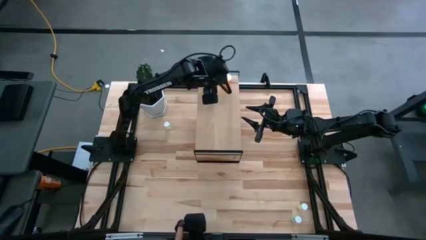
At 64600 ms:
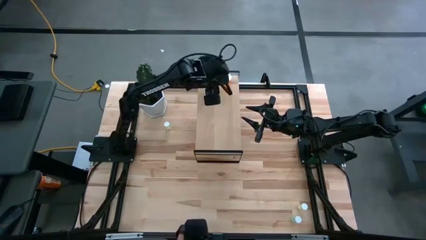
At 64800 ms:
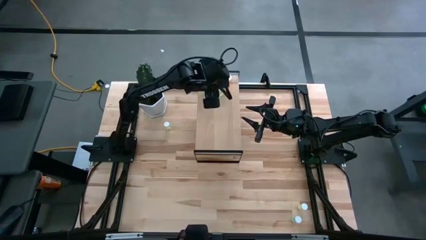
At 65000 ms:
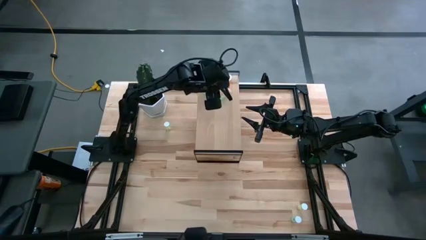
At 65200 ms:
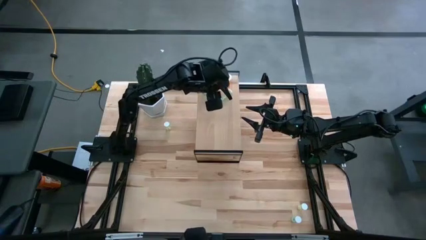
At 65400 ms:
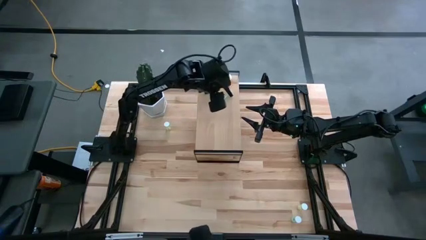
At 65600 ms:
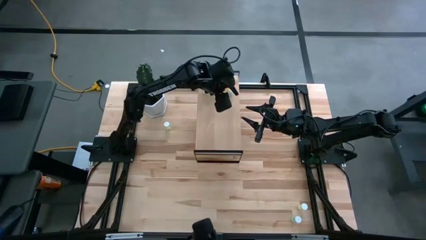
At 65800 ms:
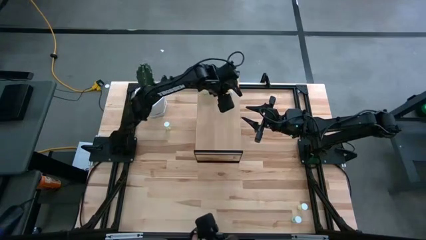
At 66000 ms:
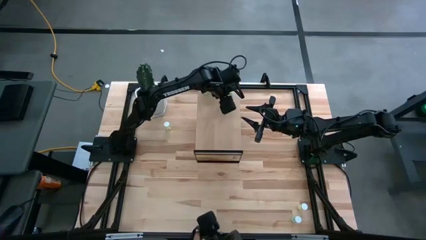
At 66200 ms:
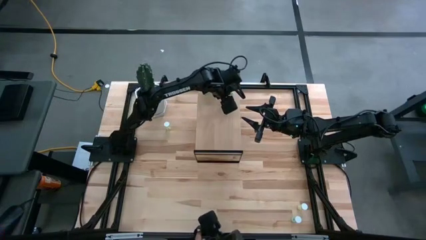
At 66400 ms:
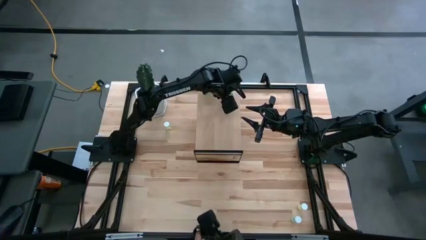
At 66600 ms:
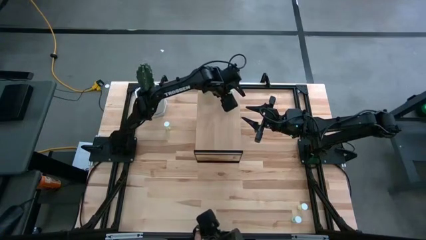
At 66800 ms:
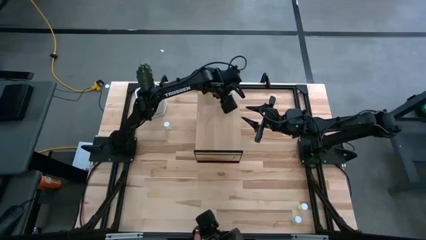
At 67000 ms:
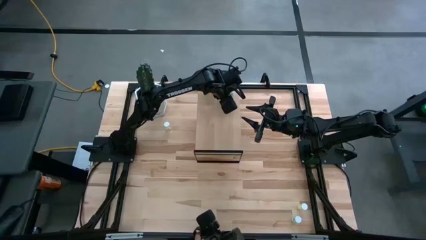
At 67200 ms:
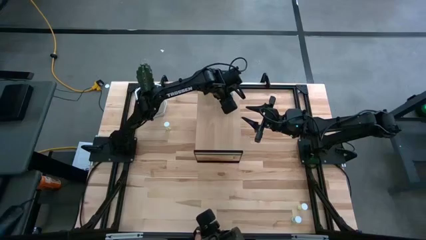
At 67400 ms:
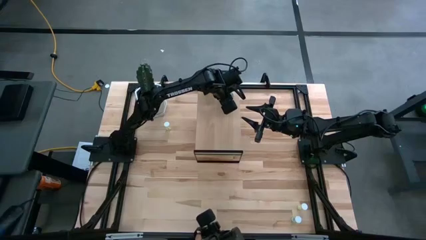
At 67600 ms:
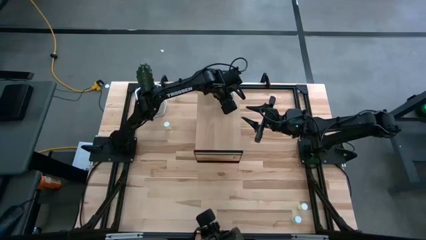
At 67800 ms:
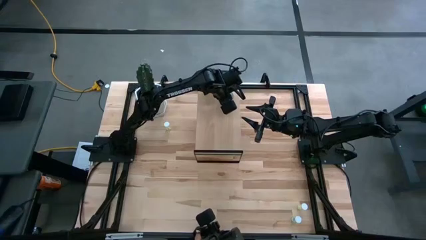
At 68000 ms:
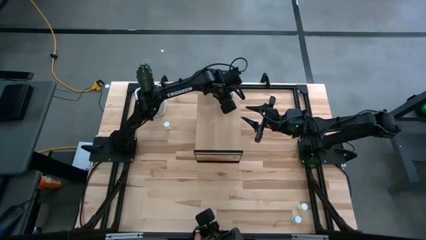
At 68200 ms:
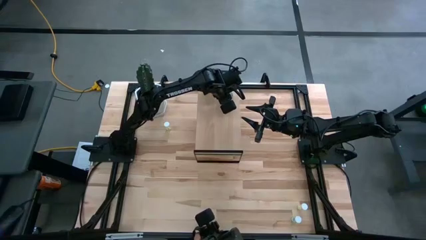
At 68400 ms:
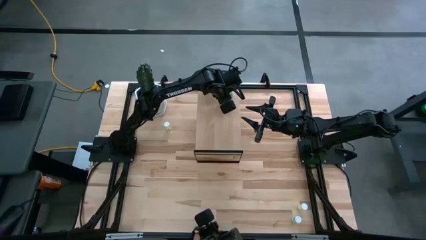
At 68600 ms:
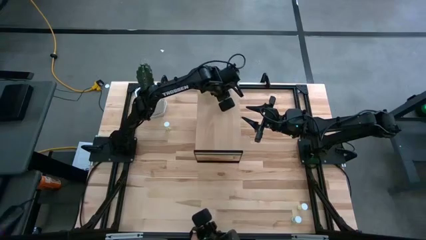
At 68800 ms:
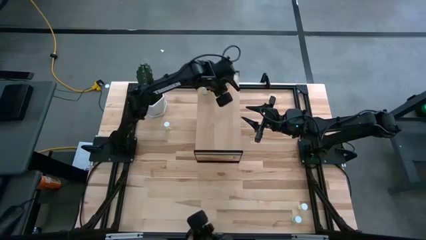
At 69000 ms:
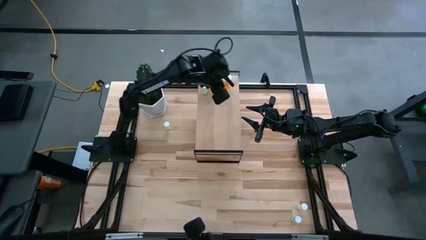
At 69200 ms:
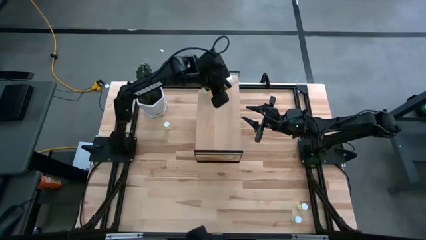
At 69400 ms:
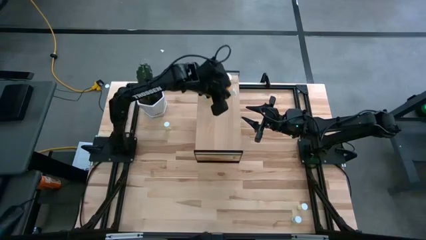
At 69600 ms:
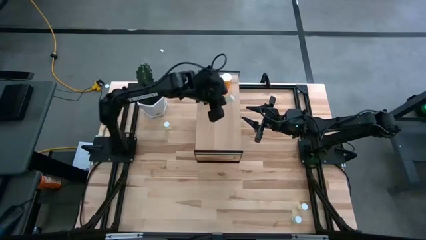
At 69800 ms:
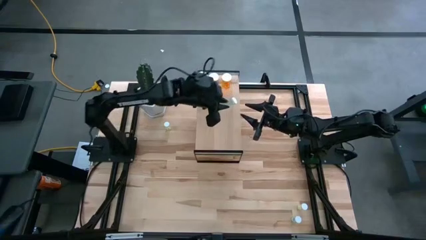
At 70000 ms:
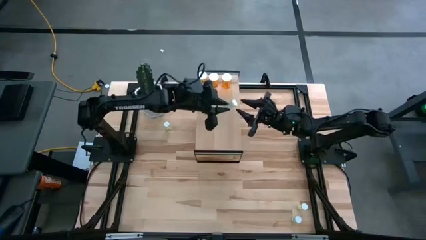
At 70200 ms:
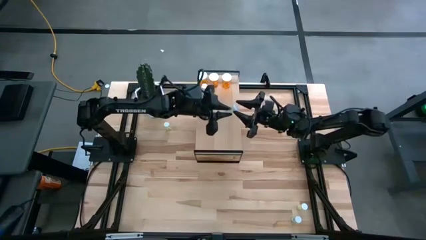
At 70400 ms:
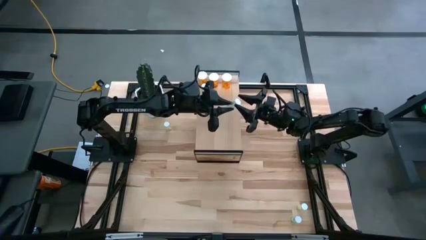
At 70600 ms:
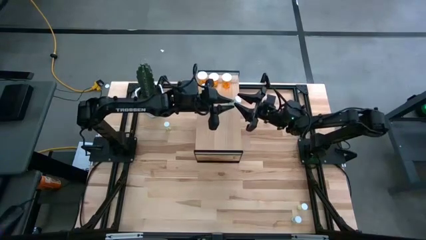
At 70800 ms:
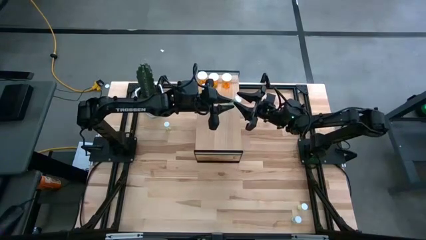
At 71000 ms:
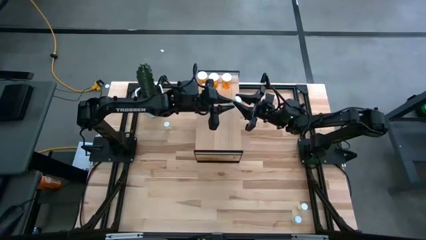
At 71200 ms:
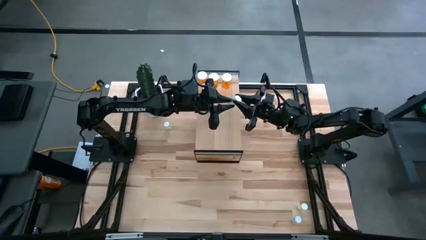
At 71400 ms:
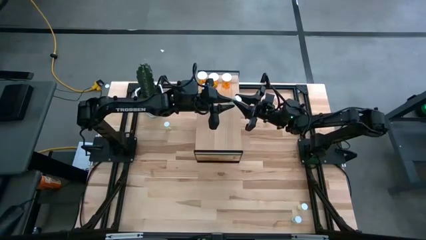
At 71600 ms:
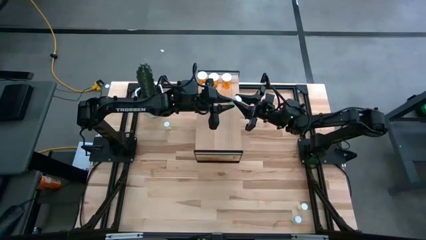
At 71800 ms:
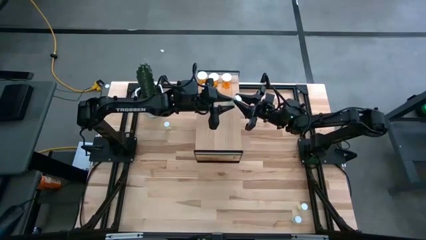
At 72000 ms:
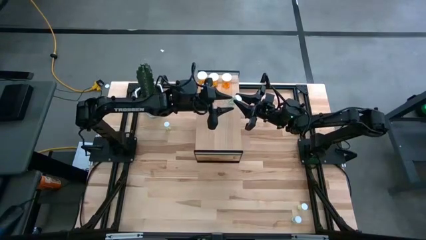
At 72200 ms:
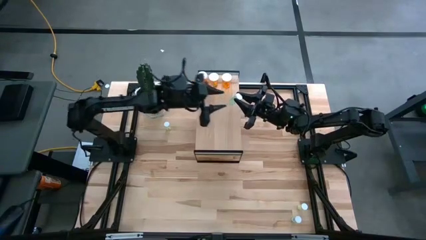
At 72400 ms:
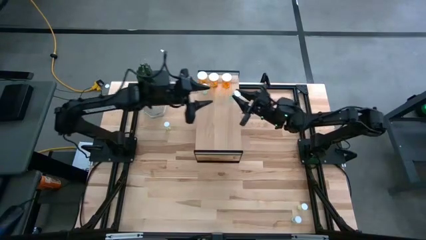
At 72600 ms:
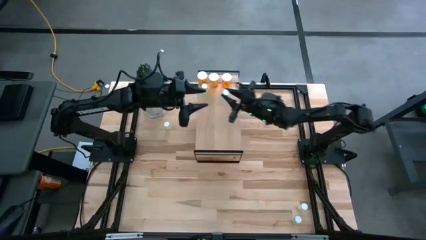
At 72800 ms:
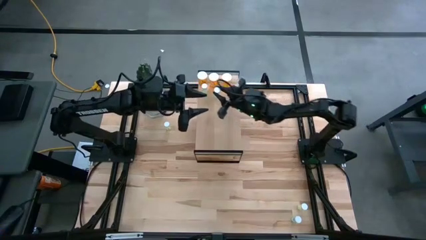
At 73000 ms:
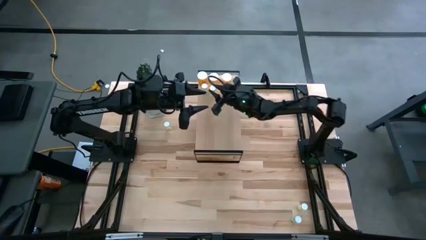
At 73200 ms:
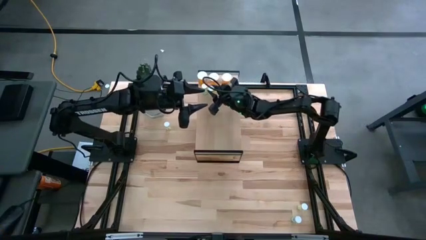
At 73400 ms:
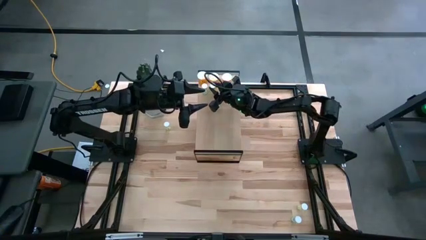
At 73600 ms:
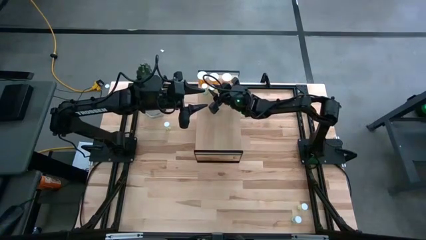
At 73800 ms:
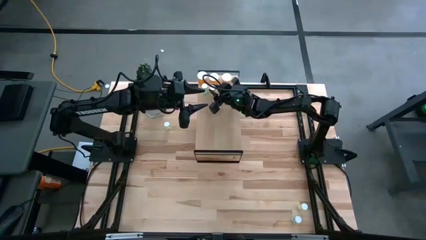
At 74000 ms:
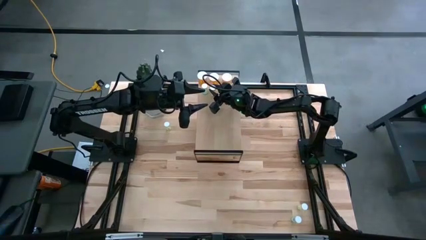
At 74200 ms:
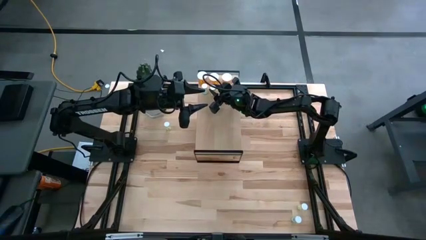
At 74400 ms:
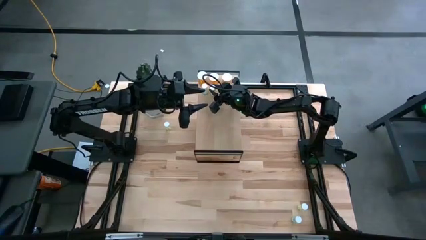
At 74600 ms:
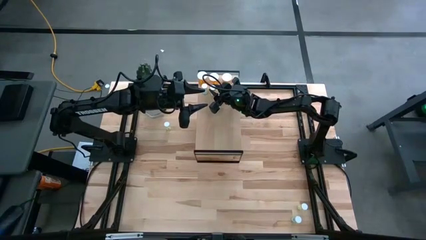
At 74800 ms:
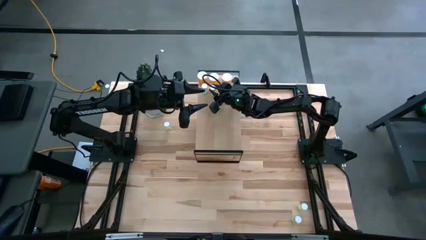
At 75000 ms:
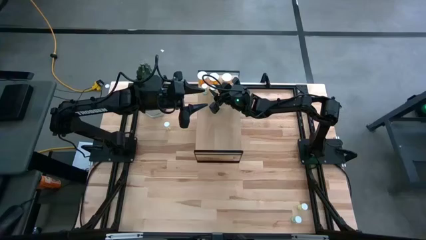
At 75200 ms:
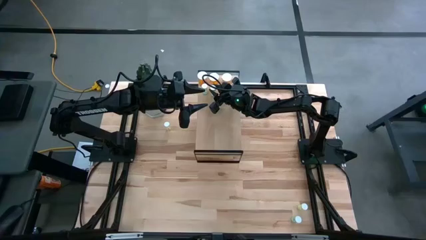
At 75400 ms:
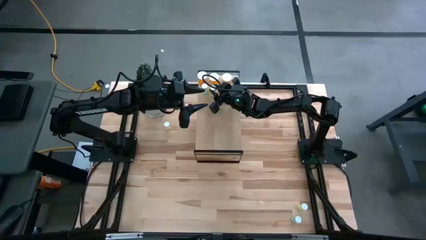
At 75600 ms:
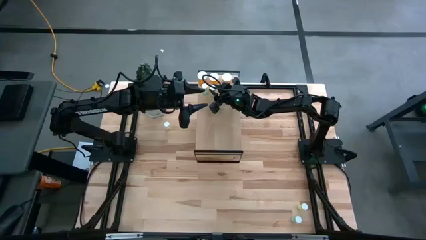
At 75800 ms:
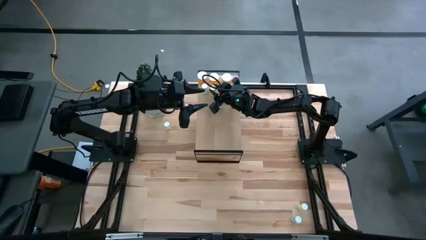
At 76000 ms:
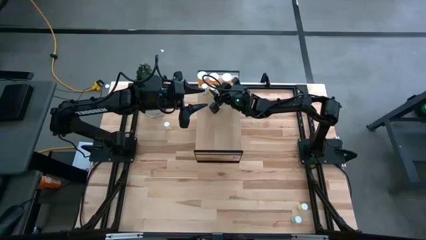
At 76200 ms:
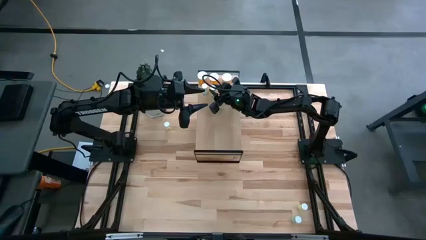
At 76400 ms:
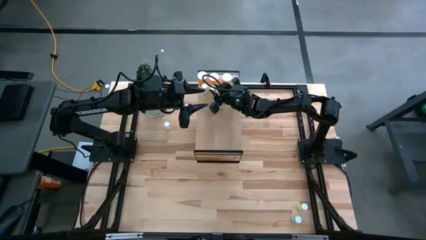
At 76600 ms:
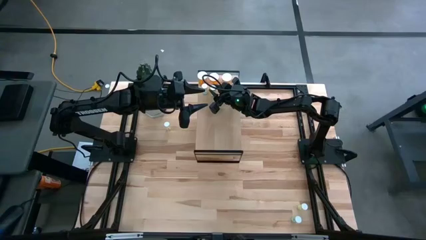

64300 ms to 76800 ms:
Task: Pick and place medicine bottles onto shelf by color
Put the left green pill bottle on the shelf aligned with the other green pill bottle

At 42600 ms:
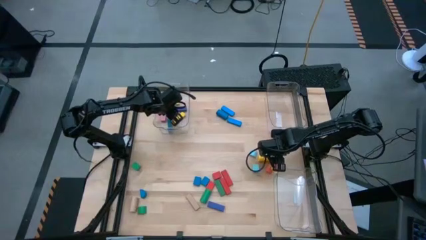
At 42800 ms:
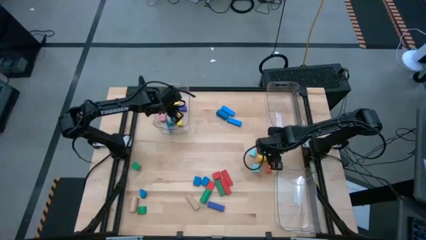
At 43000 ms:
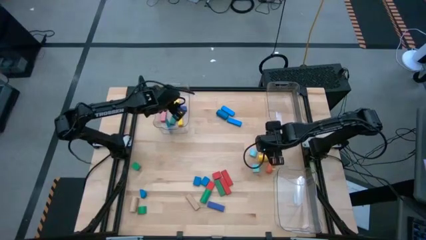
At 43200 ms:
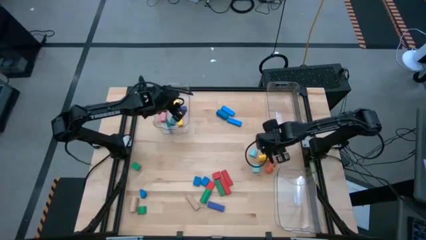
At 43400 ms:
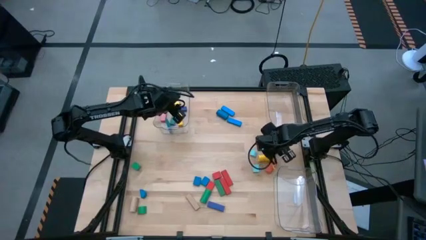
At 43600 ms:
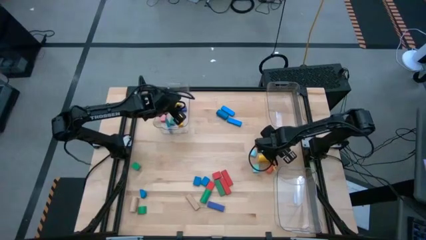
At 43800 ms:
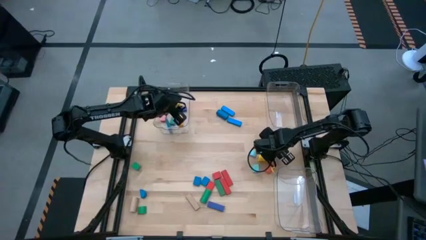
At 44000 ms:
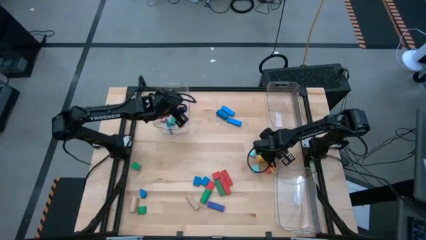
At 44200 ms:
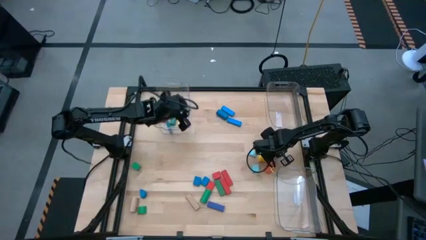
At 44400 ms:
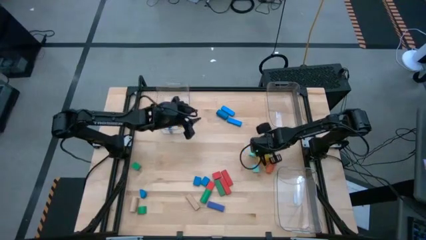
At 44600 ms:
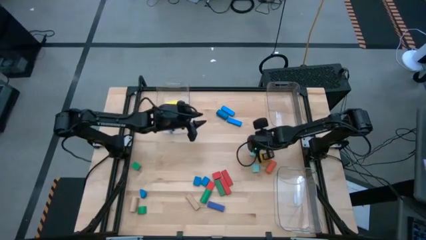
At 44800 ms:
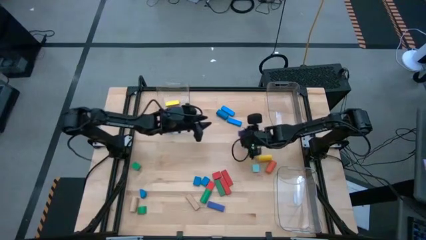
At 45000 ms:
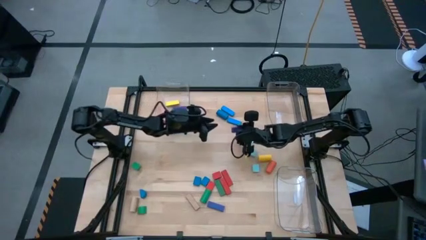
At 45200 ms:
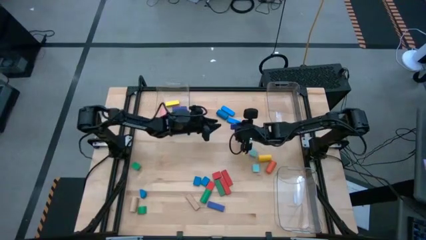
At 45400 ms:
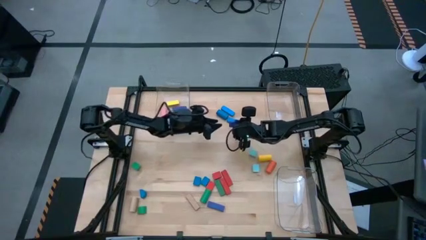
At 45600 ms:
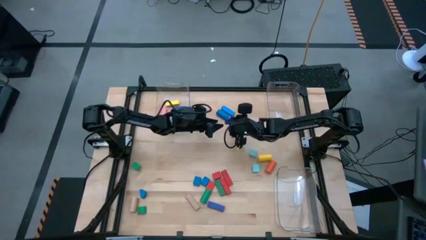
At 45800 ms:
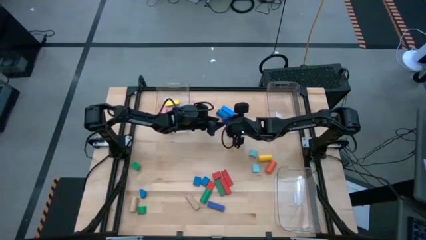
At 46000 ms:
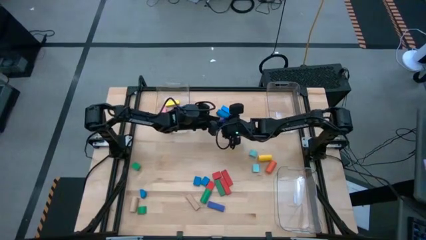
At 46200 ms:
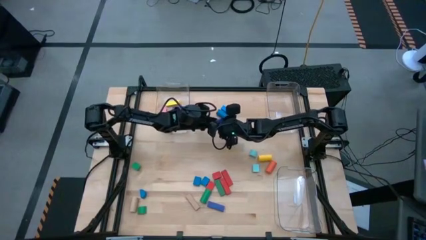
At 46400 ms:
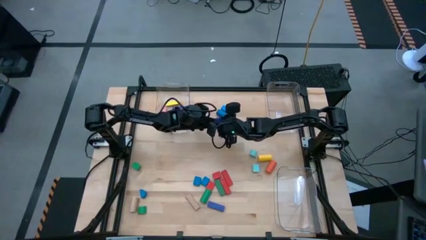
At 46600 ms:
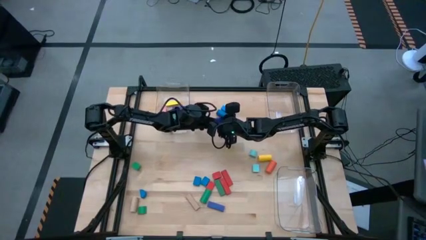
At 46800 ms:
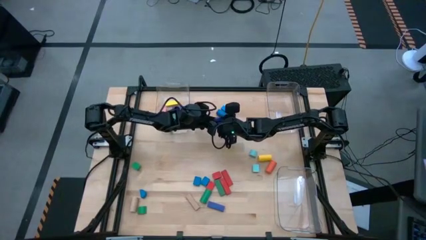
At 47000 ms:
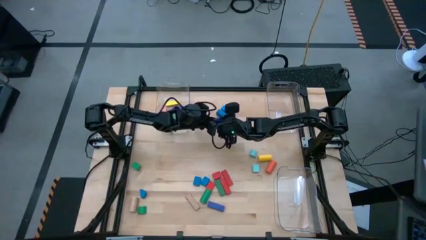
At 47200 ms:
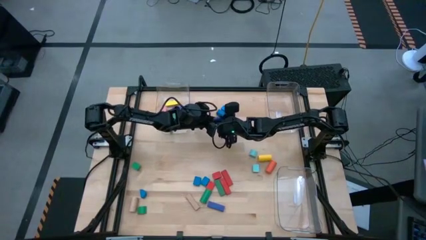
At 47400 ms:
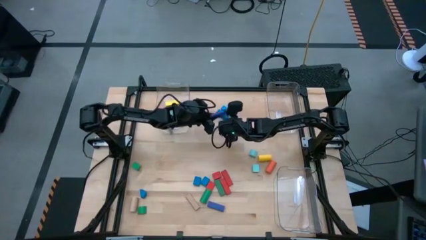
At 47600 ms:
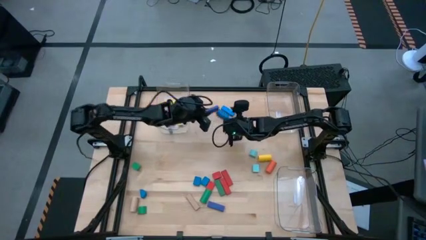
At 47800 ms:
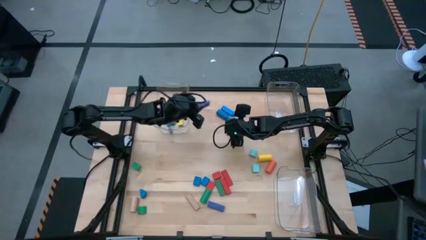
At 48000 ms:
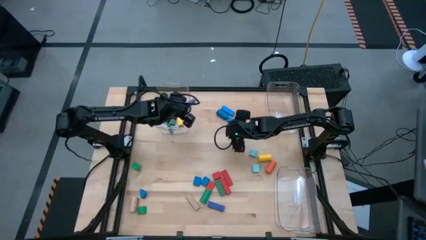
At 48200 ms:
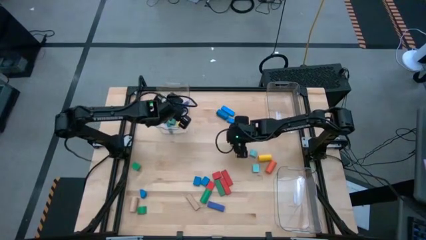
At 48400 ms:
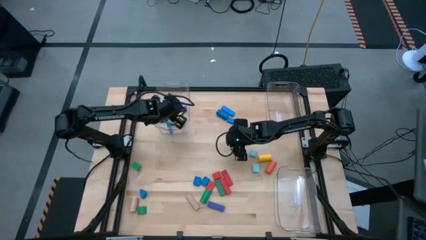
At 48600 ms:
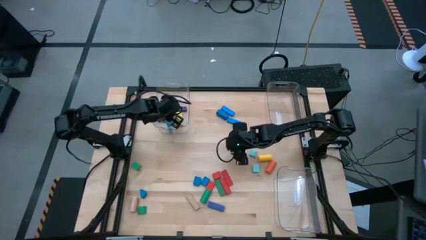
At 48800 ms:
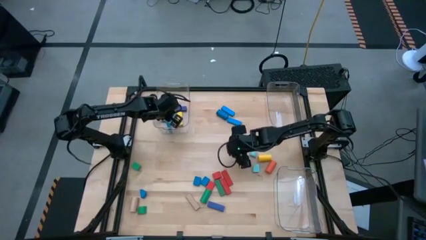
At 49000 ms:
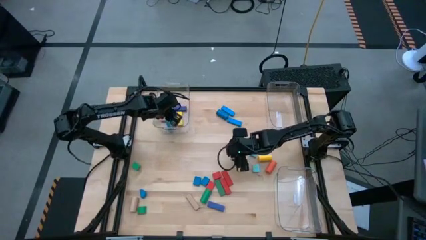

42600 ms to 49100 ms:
Task: Sort blocks by size
Put the blue rectangle block into the top left transparent bin
